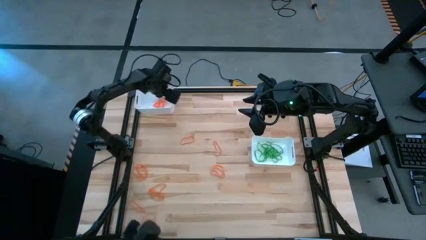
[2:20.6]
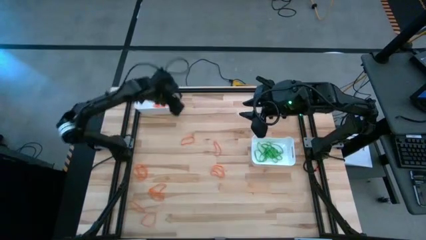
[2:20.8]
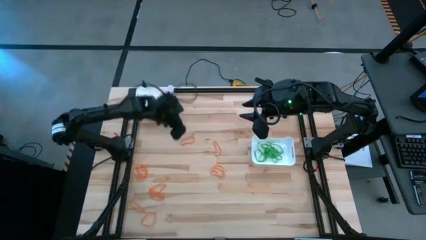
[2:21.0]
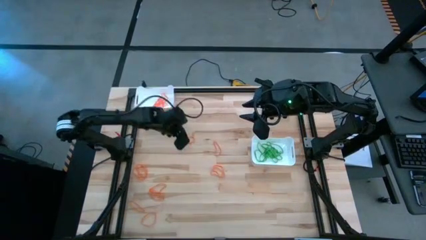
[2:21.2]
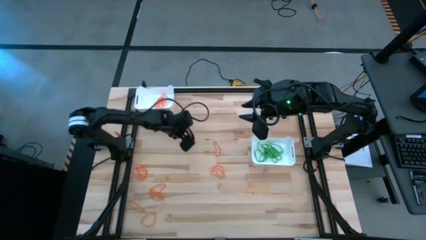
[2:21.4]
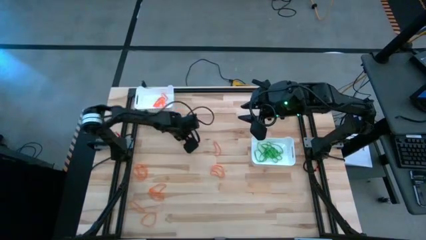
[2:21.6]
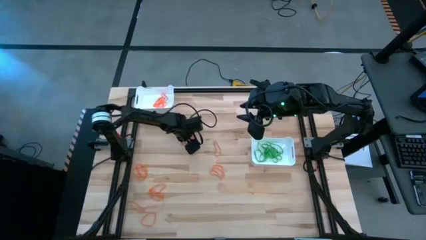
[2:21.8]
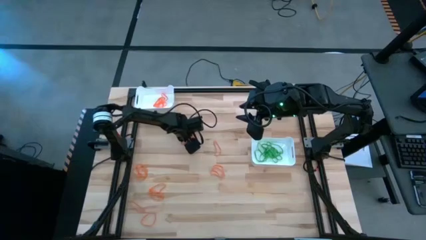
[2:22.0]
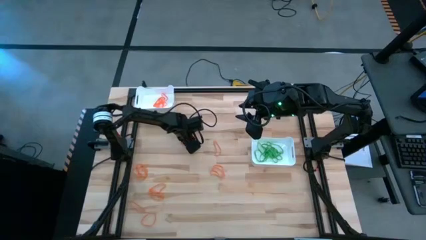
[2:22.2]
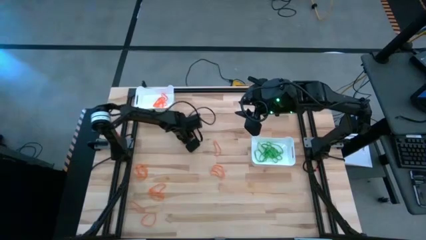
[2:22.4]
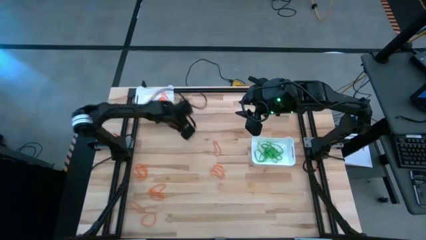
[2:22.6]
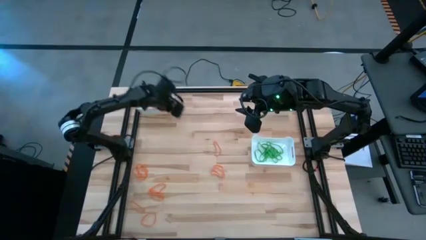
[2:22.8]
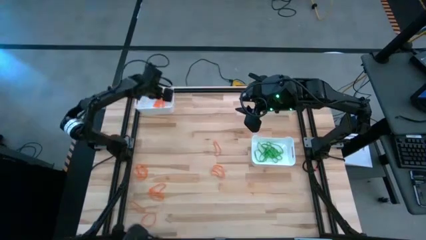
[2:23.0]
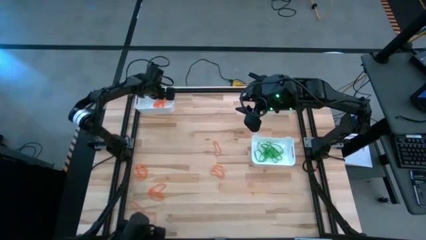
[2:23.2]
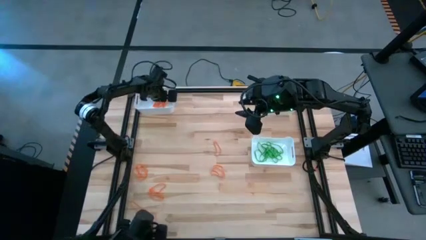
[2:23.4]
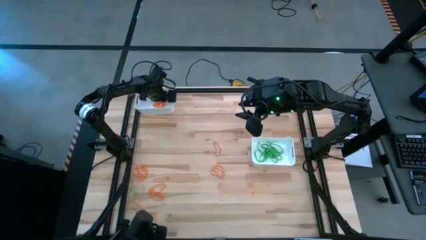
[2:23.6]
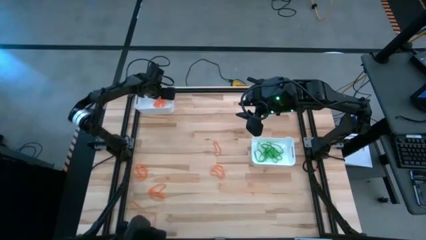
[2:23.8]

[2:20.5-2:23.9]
Task: Sort rubber bands into baskets
Put the orange rubber band into the top left white bin

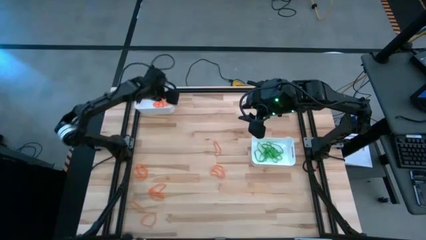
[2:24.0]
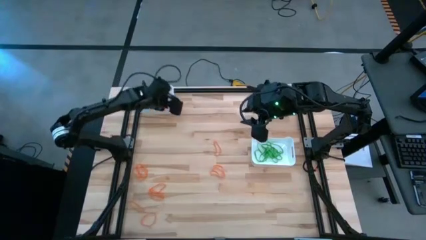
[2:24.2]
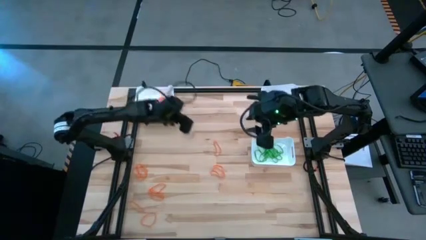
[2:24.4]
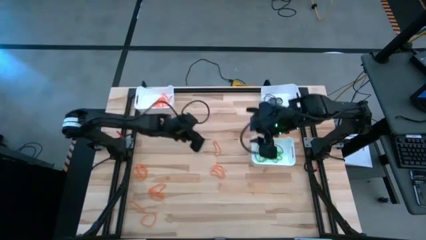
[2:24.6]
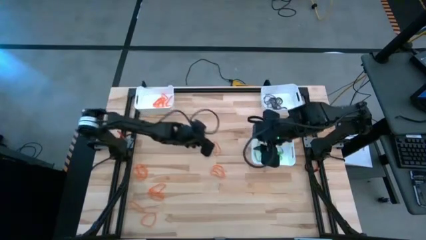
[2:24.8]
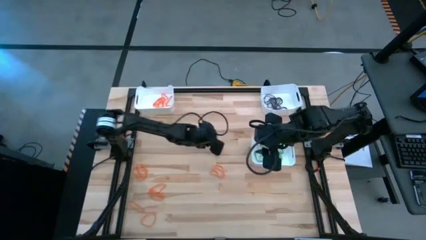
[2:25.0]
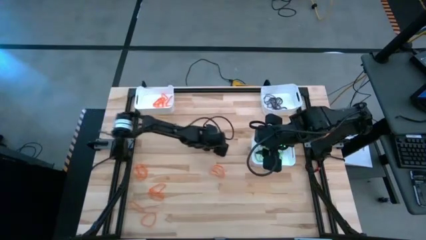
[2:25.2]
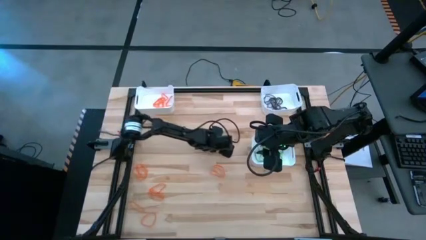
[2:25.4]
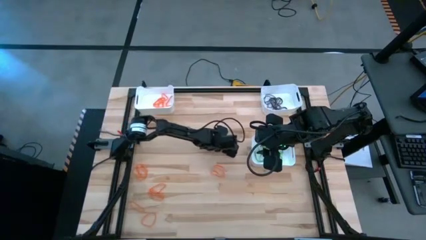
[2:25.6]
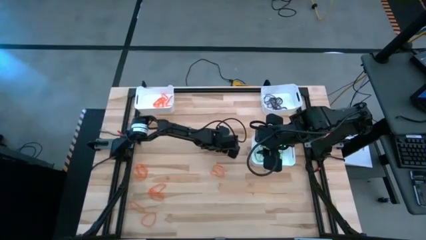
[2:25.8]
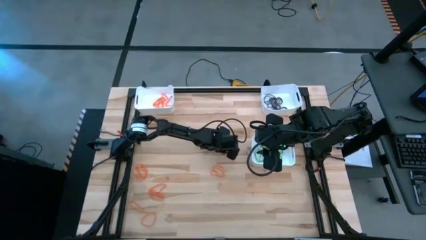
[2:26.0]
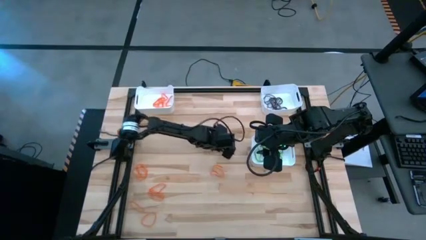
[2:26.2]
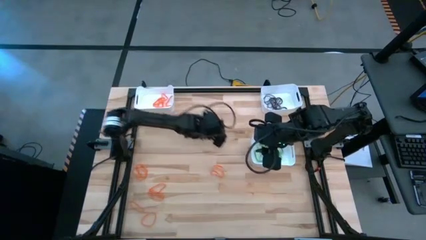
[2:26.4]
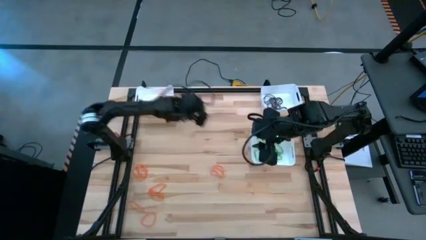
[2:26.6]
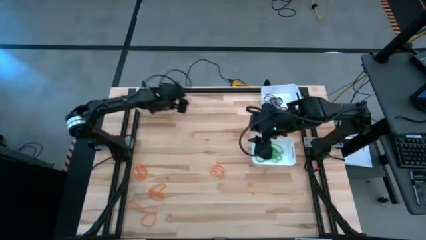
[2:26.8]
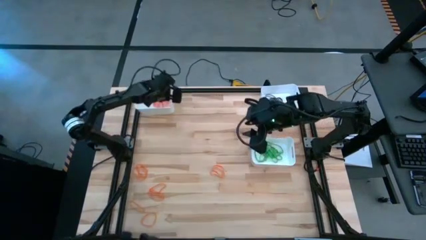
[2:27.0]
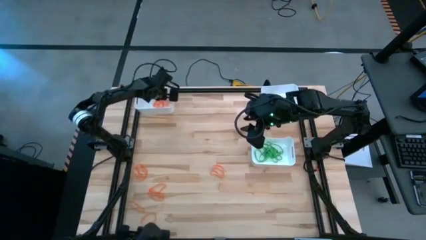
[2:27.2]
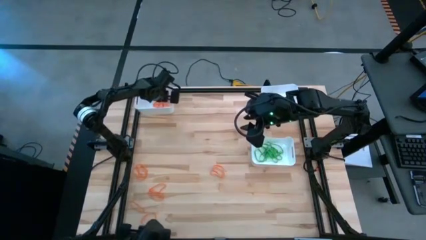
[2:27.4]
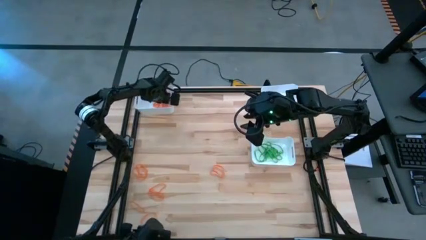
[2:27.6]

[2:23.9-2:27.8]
Put the orange rubber band into the top left white bin

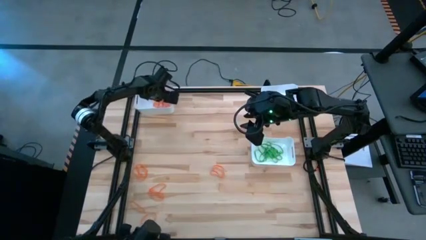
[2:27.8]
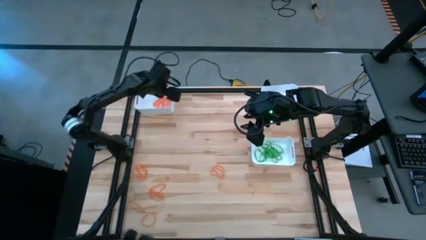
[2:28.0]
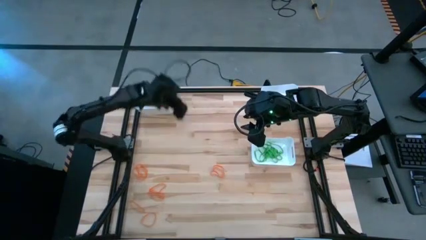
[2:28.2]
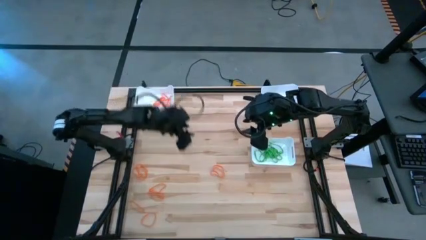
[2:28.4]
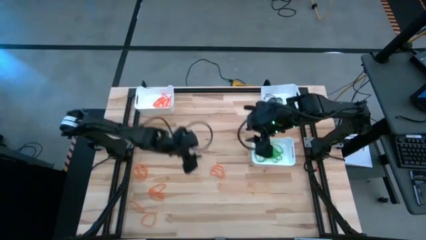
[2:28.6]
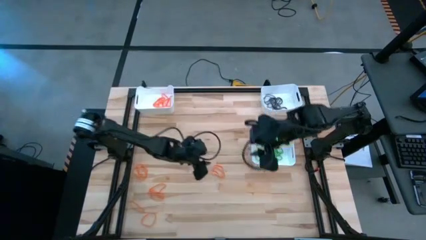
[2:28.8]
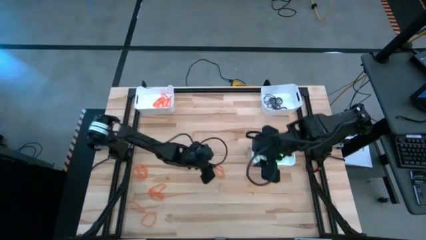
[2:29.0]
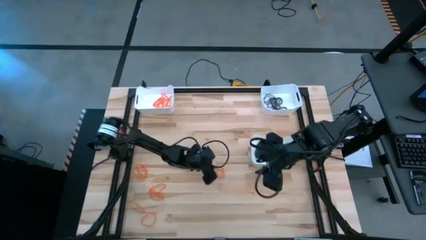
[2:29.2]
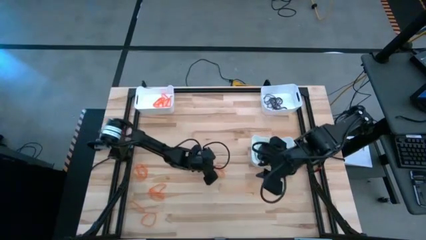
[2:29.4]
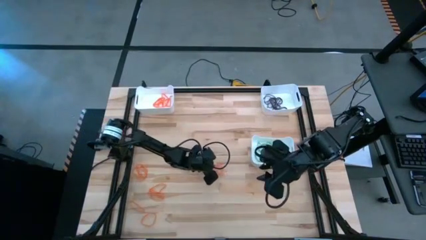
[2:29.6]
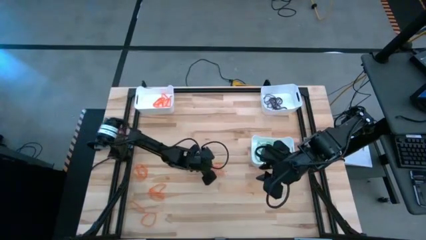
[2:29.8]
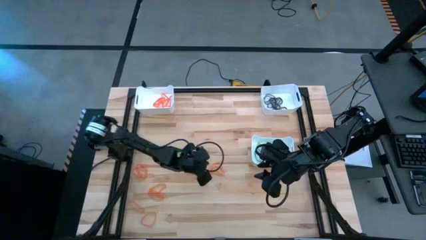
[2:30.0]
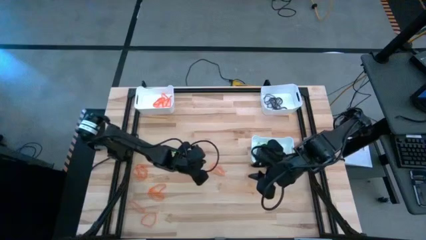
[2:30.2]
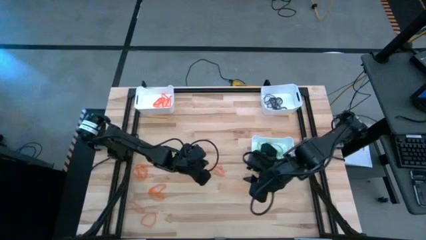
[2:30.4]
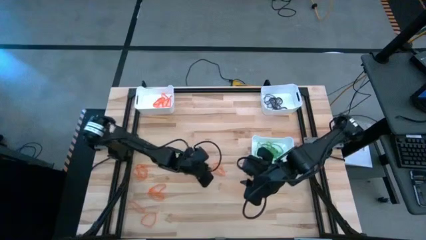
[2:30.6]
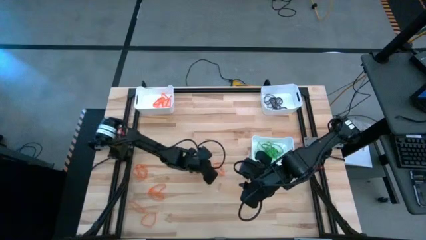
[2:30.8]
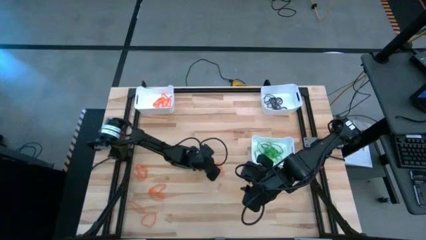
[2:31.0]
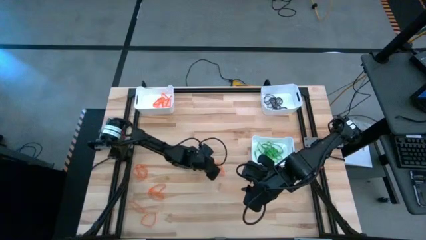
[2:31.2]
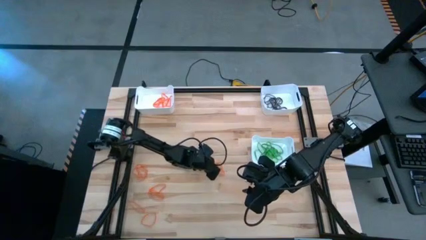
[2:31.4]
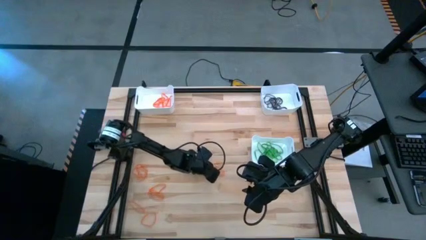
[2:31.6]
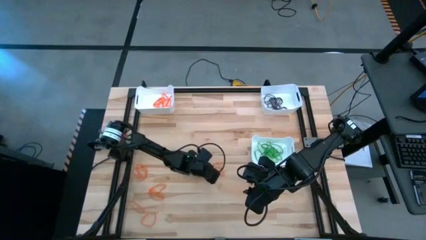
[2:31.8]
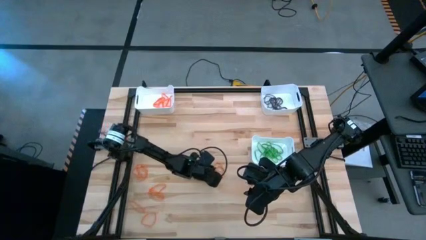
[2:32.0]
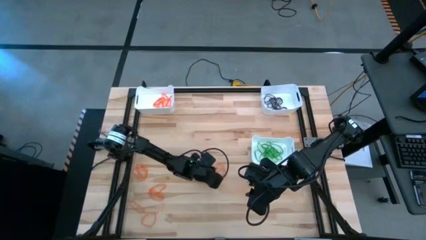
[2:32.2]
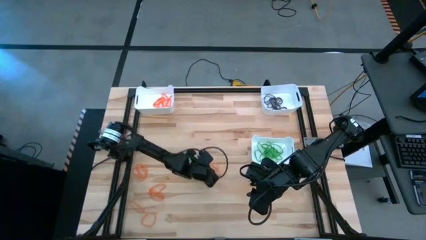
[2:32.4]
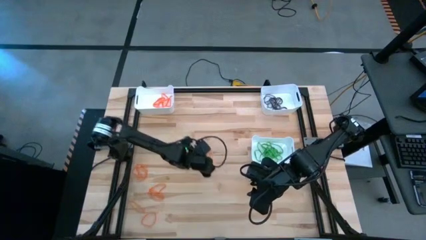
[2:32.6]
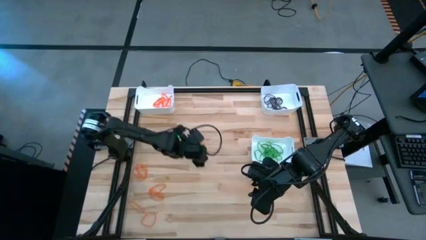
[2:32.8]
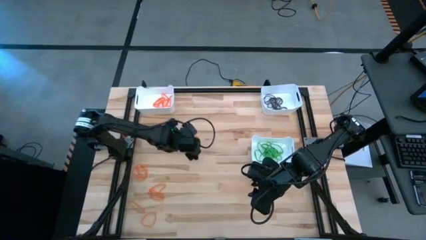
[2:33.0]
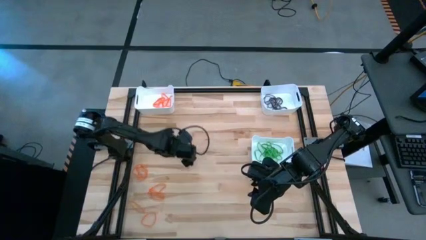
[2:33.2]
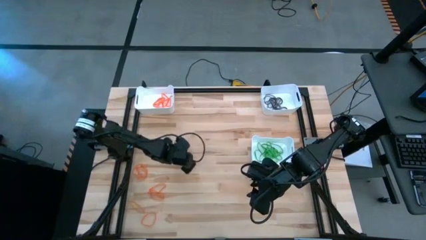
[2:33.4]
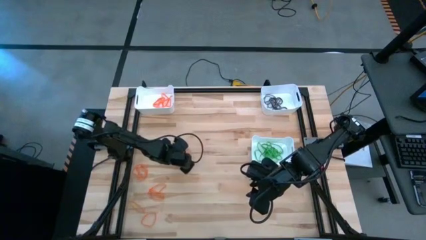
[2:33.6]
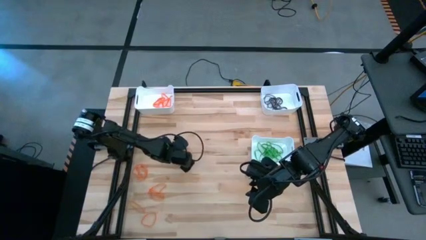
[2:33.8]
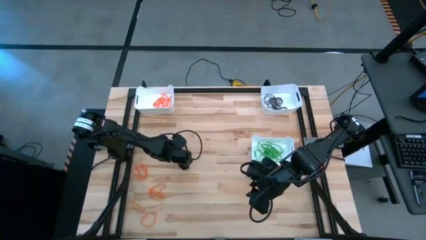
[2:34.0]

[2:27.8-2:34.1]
Put the orange rubber band into the top left white bin

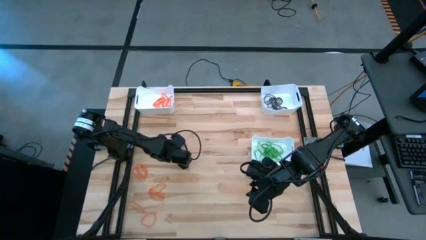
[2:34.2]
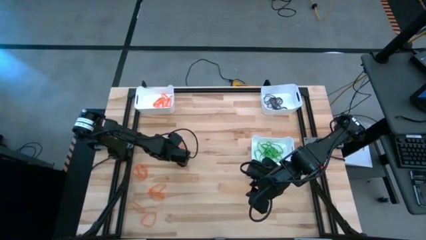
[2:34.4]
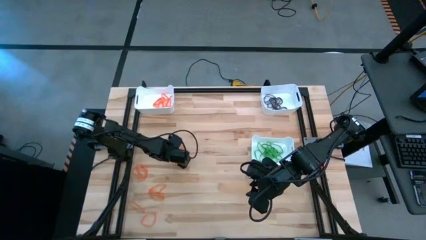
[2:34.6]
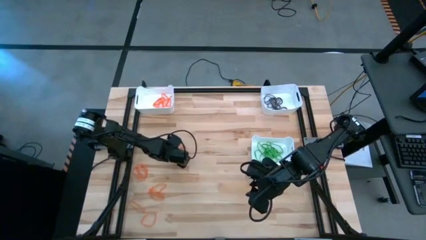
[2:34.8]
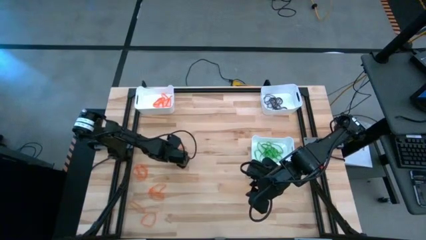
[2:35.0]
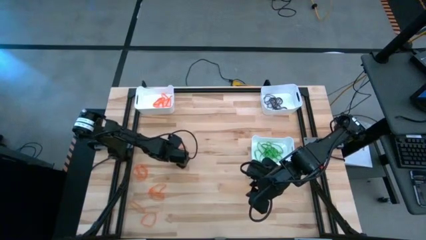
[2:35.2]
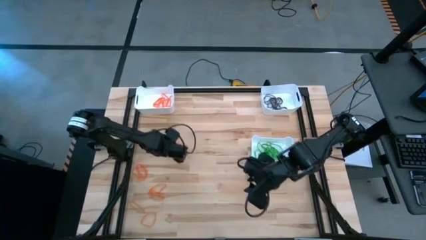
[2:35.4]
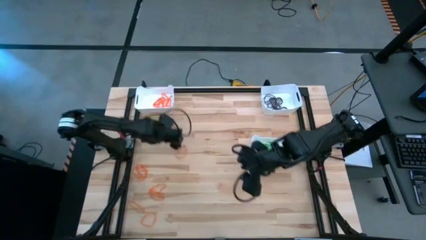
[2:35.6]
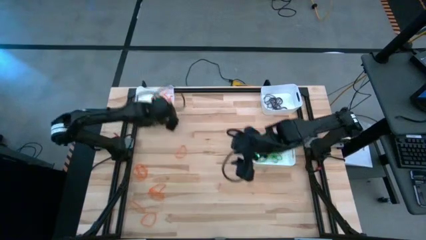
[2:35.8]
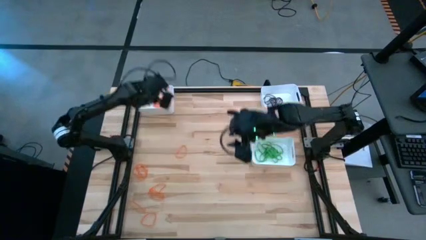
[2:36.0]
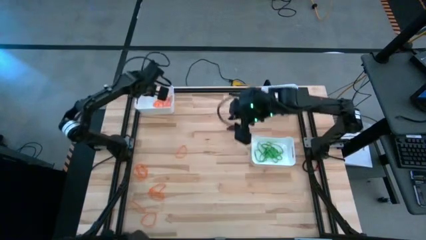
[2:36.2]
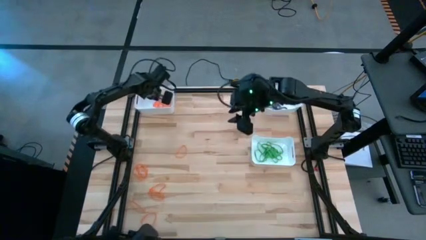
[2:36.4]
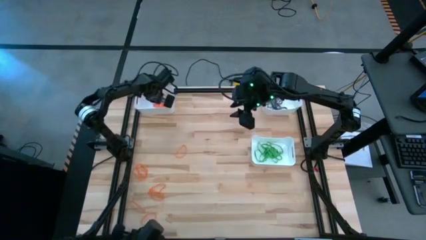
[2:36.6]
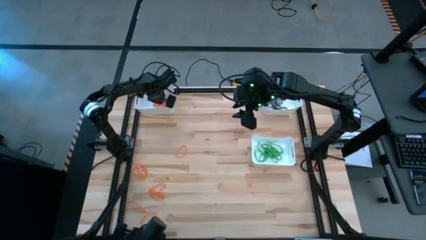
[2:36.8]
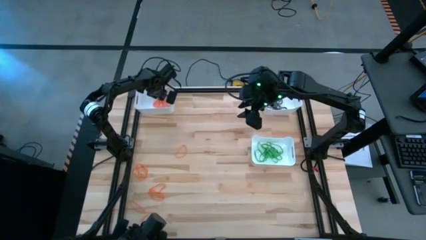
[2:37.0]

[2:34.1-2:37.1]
Put the orange rubber band into the top left white bin

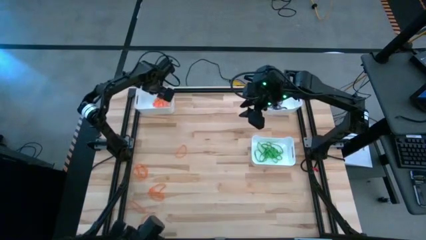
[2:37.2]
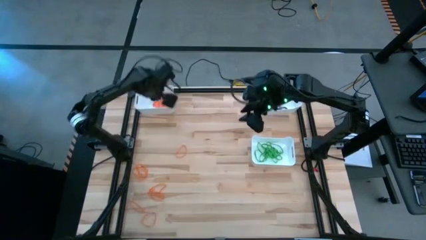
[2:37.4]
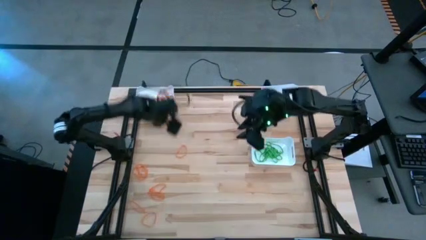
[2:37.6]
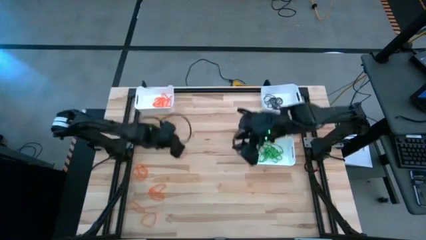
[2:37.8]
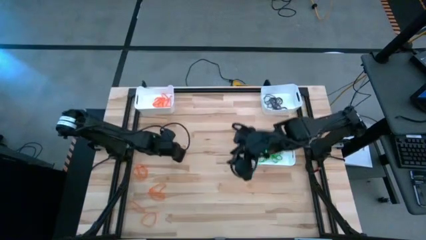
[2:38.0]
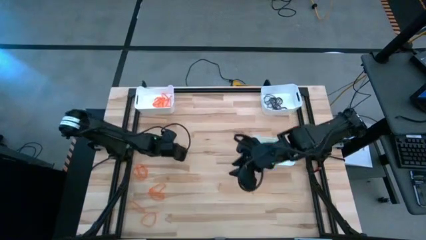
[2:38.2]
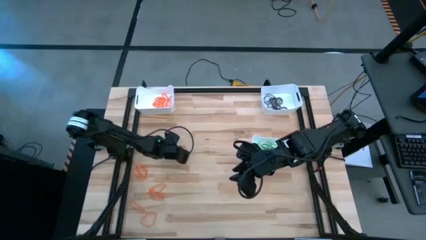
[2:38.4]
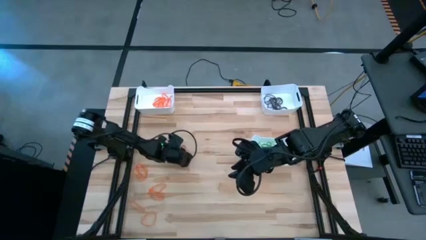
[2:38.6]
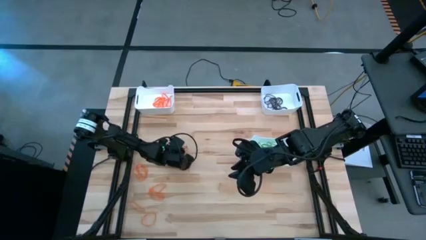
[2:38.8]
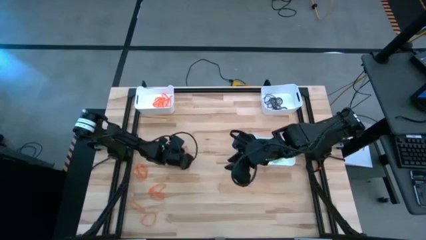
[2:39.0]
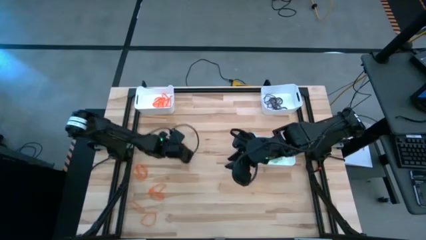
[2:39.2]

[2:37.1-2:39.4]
Put the orange rubber band into the top left white bin
